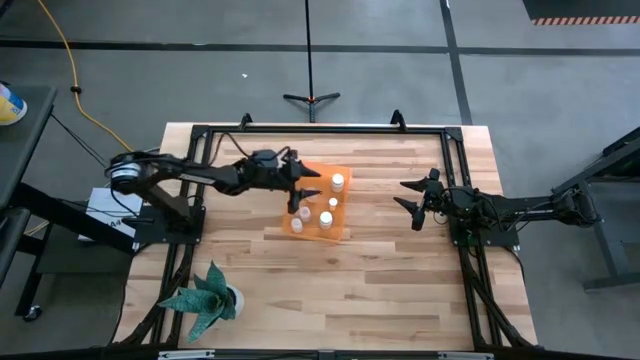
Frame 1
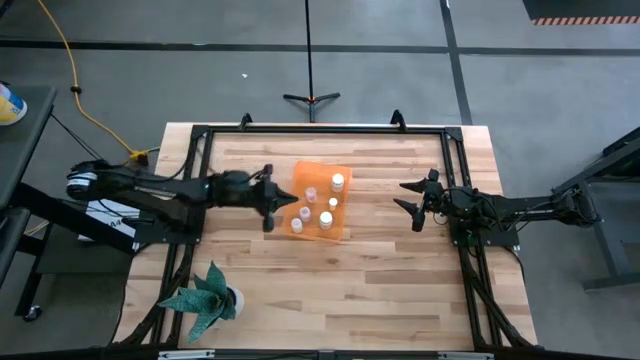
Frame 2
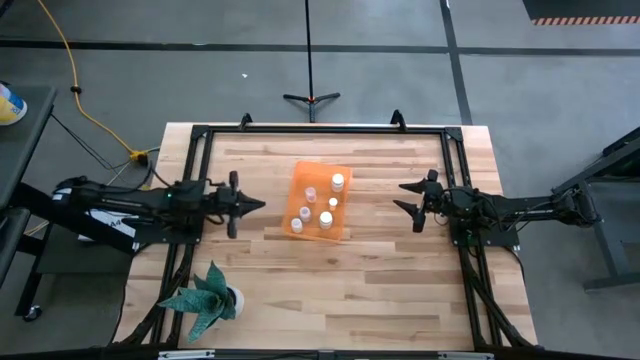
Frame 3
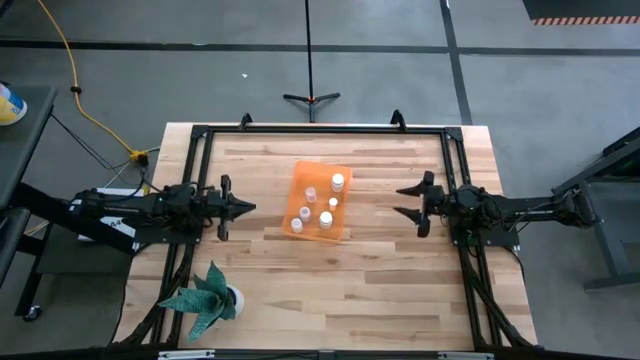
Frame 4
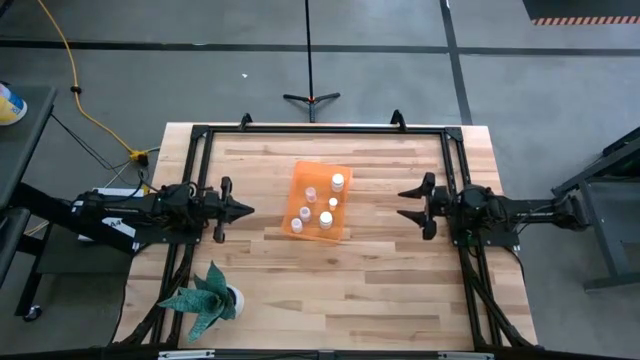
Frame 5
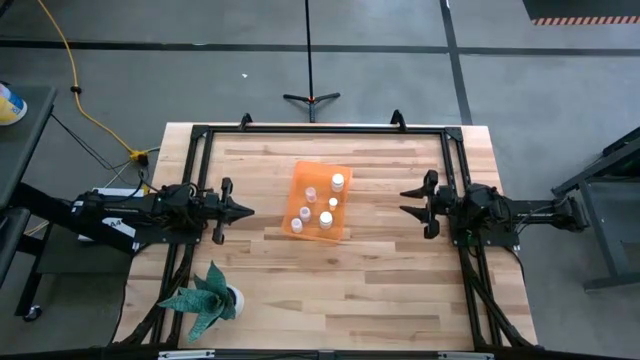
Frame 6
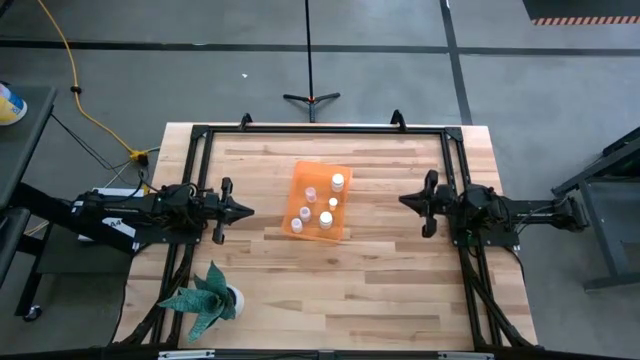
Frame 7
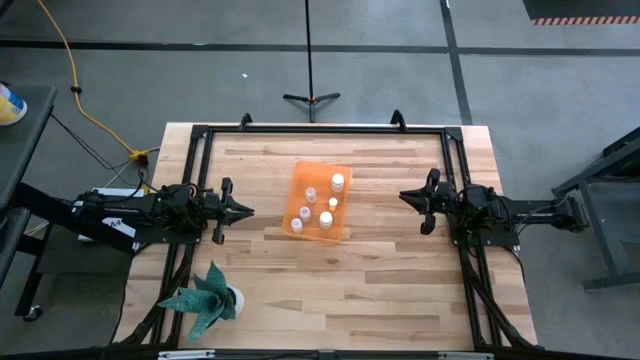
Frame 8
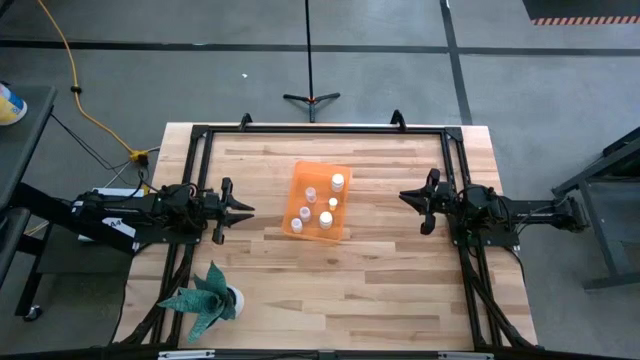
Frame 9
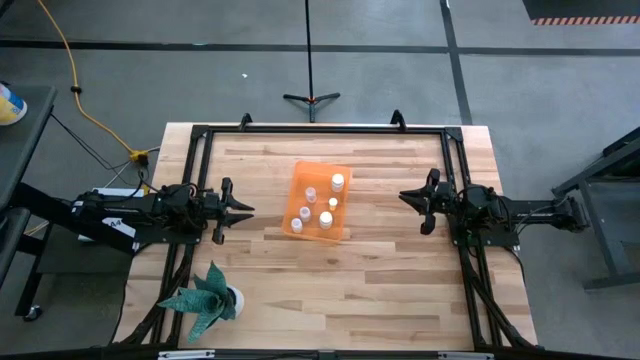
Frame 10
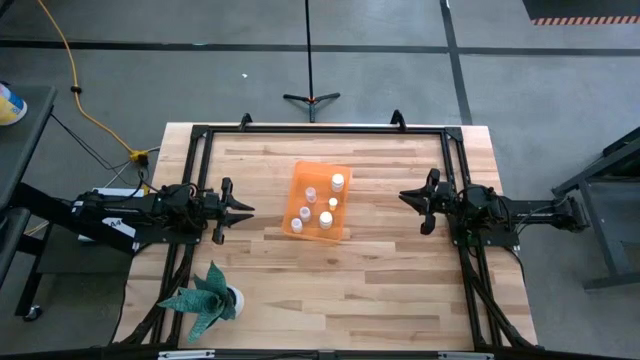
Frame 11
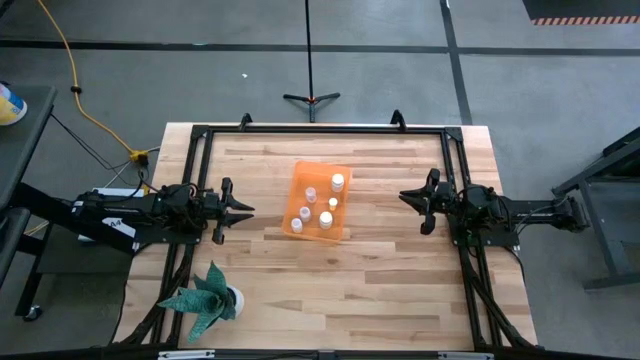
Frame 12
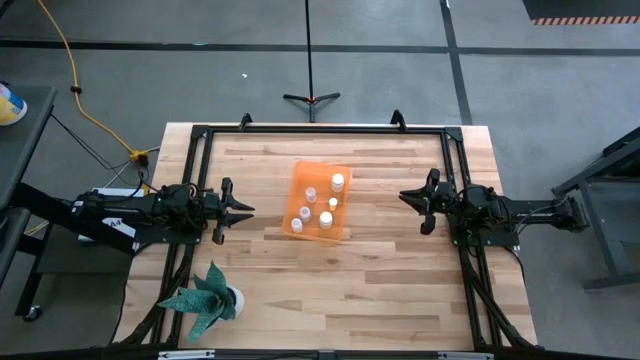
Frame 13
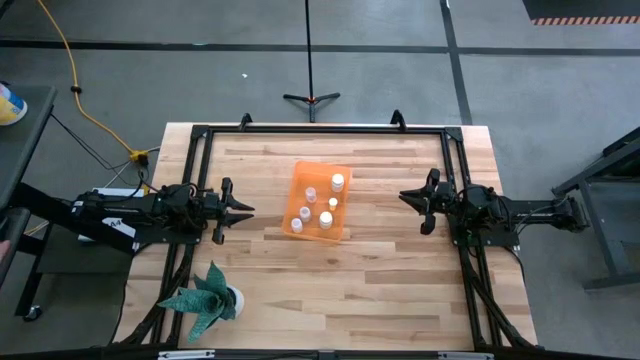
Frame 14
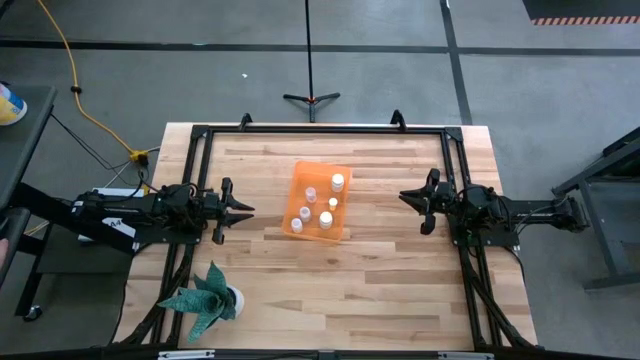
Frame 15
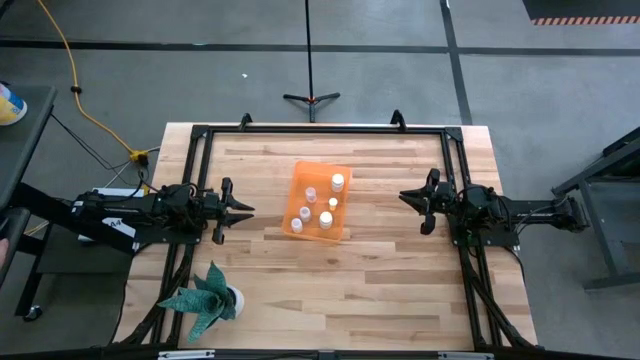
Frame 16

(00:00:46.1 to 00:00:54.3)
Task: Pick and place pill bottles into a basket
Return to Home Position

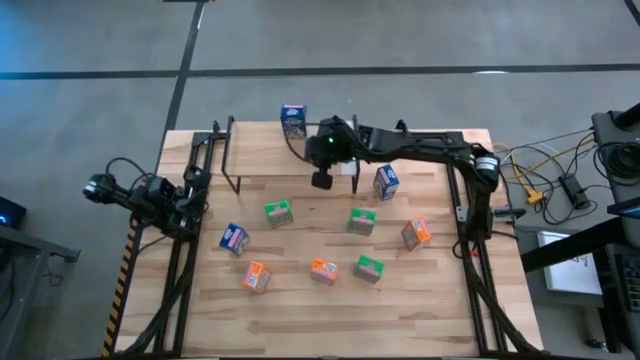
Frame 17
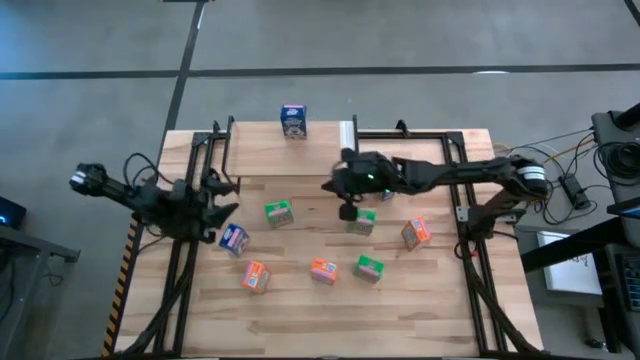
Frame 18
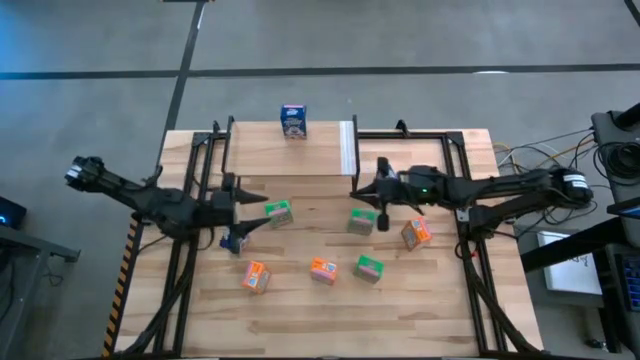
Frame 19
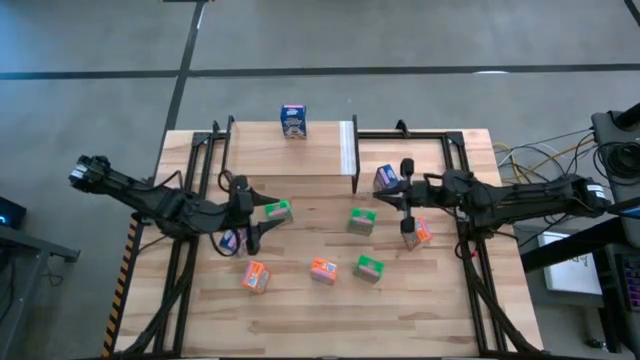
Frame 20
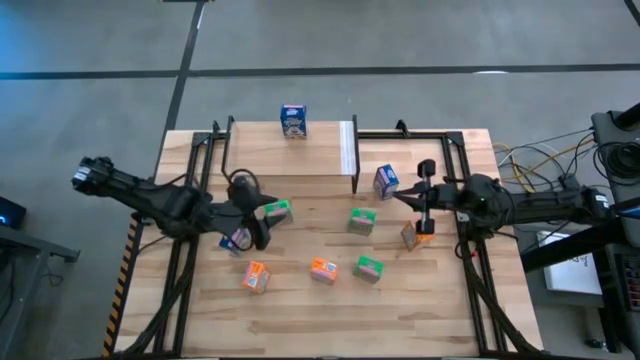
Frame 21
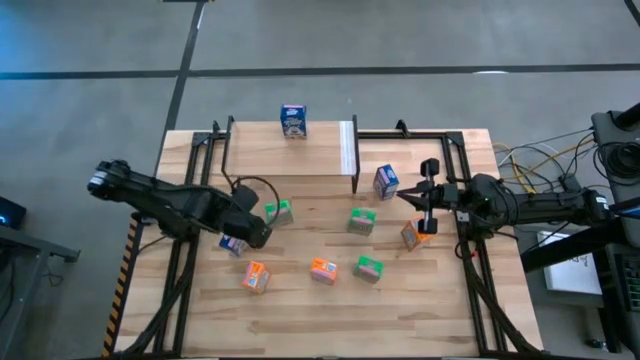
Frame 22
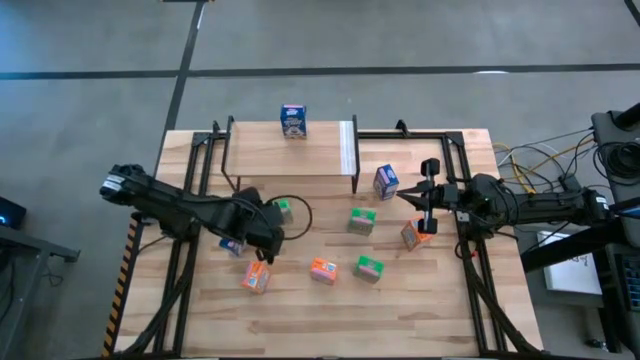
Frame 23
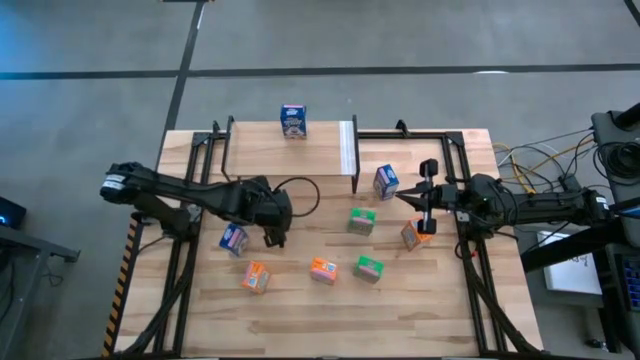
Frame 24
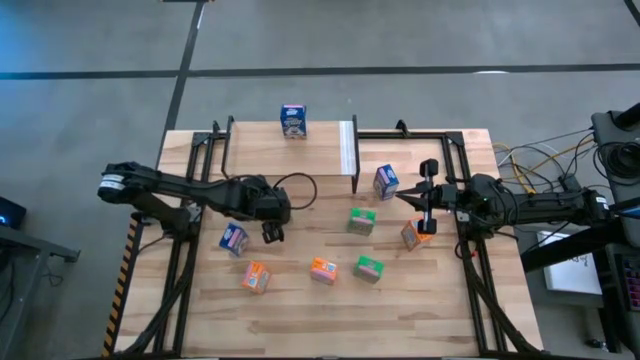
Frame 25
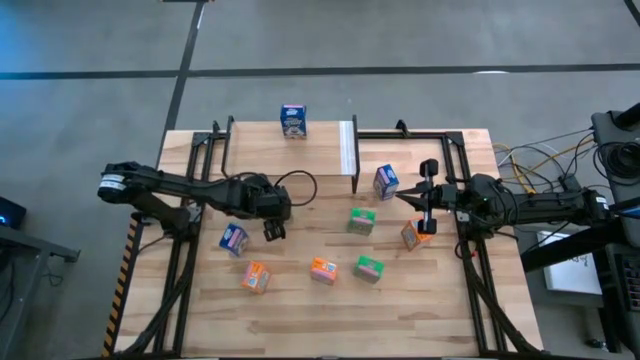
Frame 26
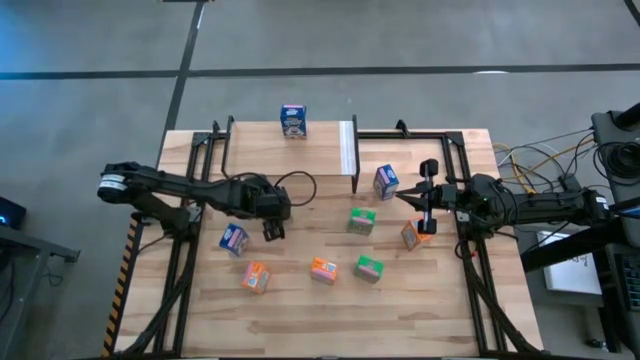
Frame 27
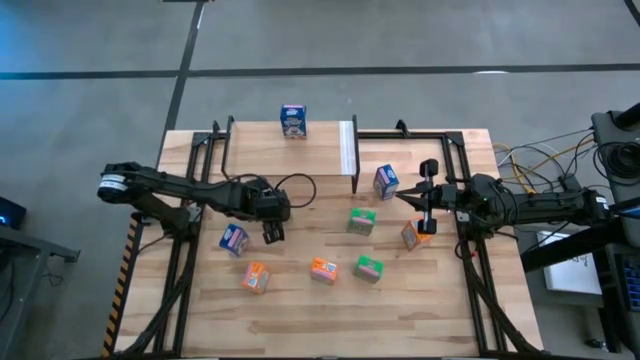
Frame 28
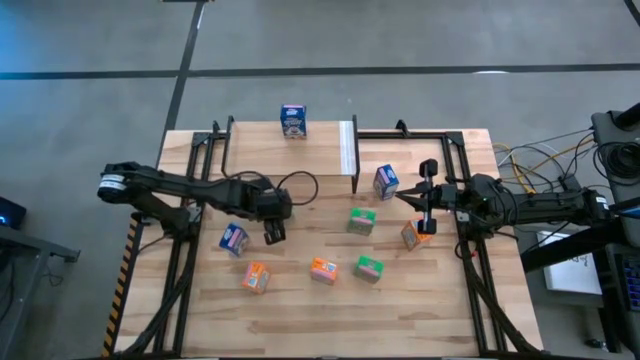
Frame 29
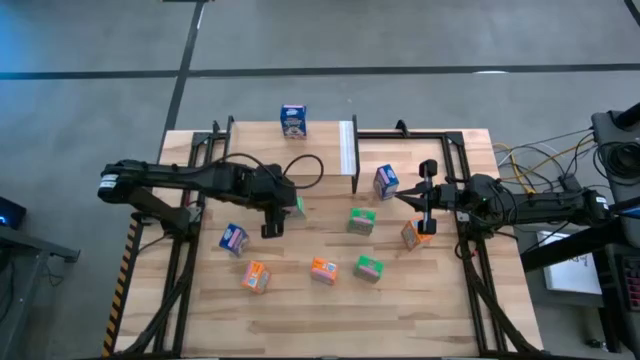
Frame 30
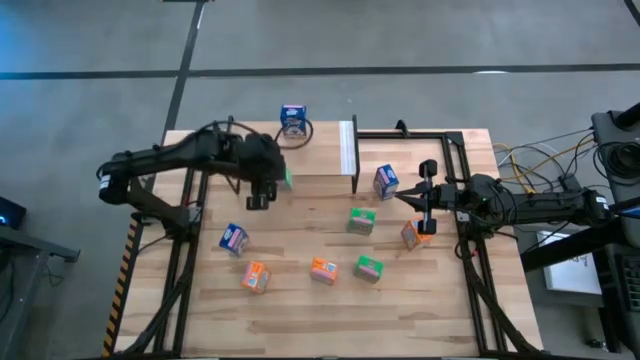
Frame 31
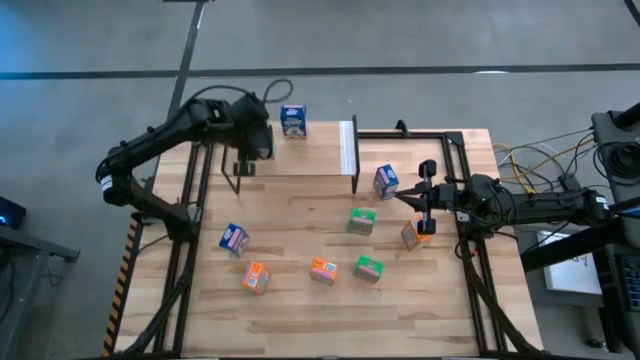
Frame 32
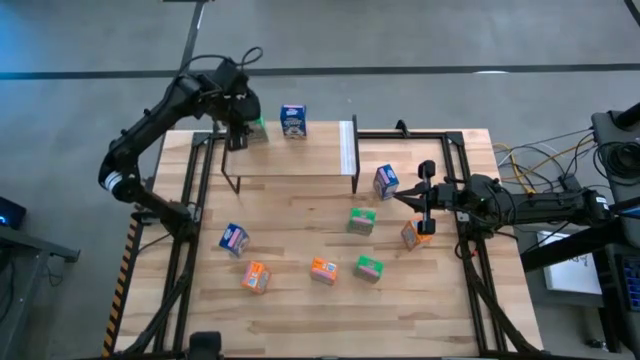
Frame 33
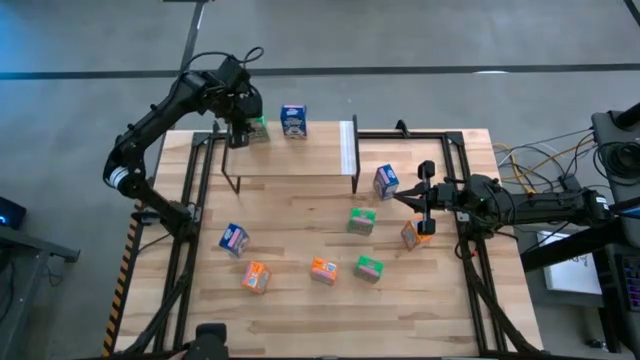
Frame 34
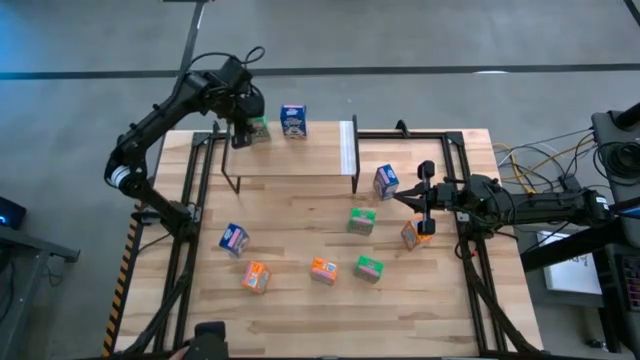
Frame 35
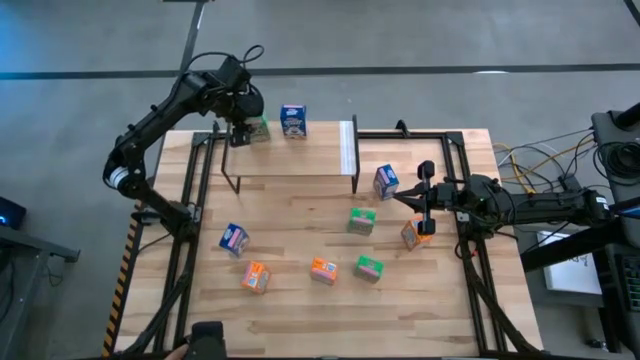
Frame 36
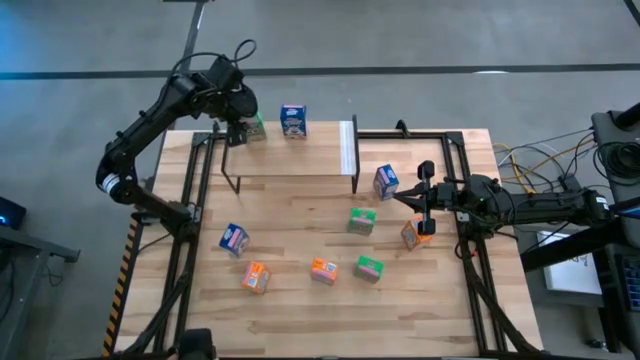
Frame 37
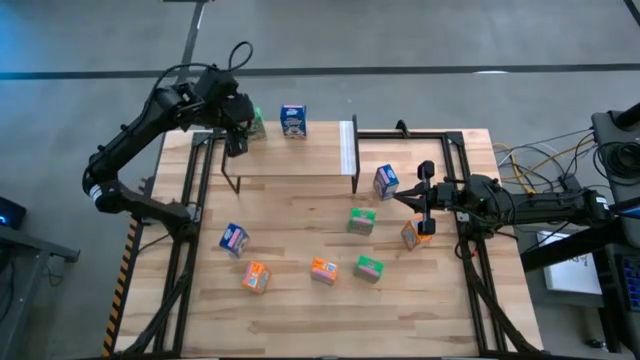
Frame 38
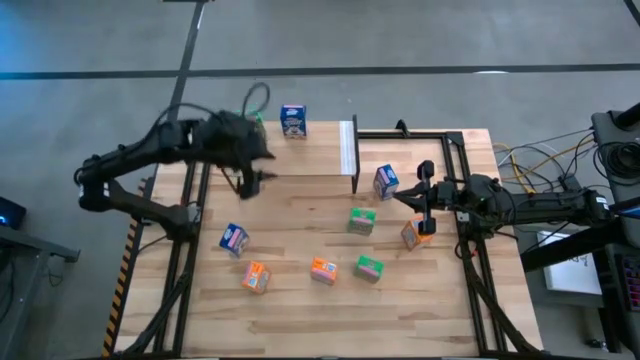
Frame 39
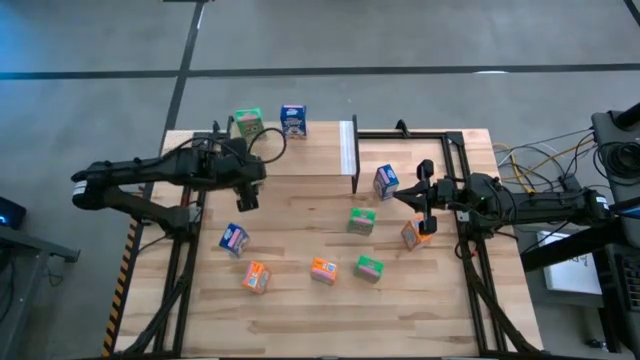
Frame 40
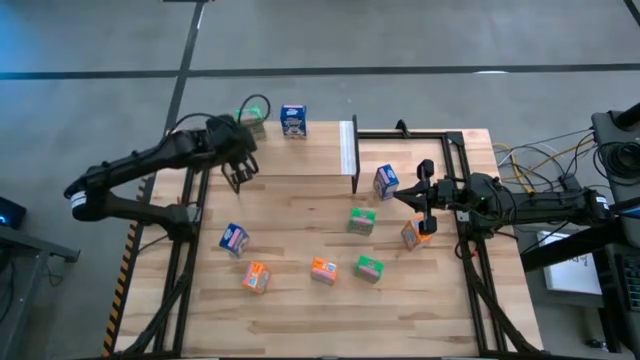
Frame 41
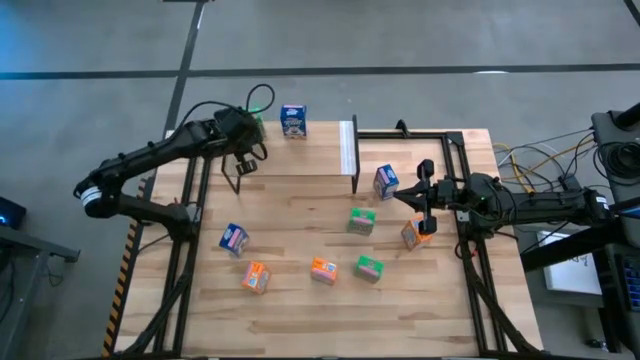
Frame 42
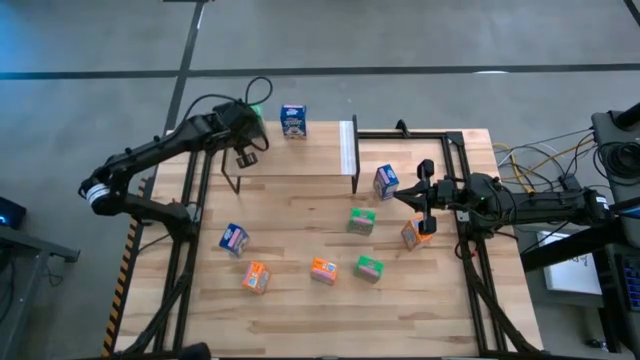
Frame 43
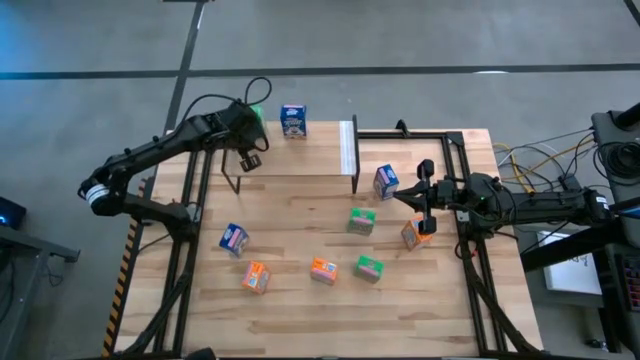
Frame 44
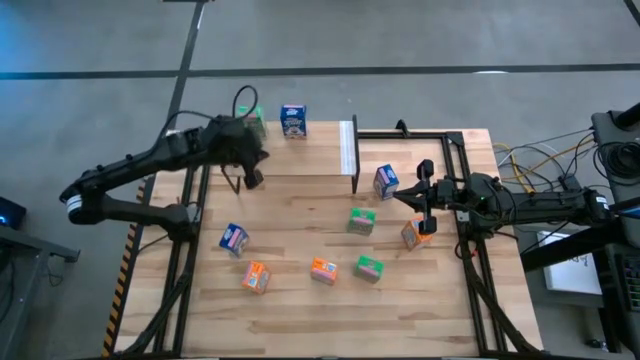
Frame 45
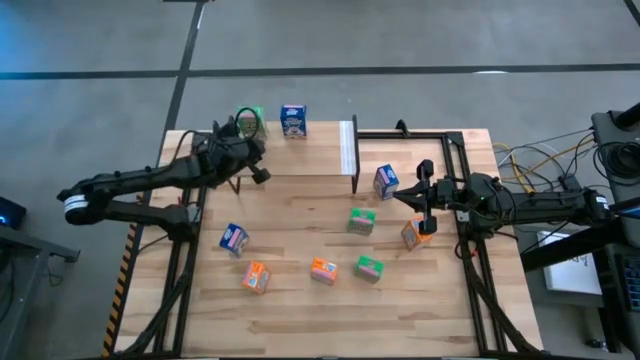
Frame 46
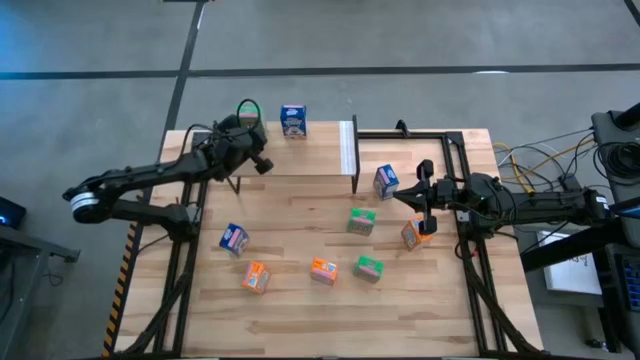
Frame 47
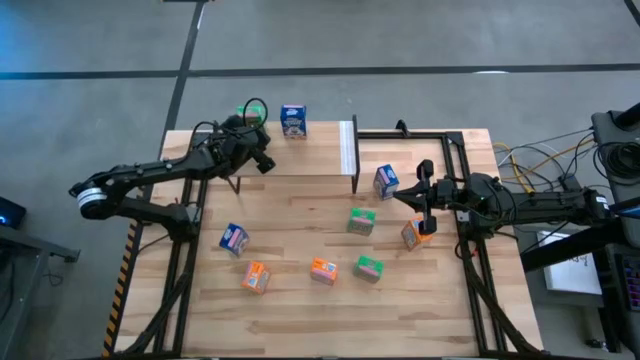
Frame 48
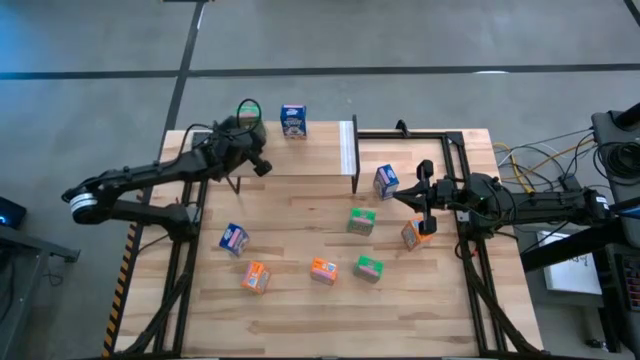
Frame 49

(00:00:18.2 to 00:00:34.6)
Task: Stack cereal on shelf
Put the top left green cereal box on the shelf
